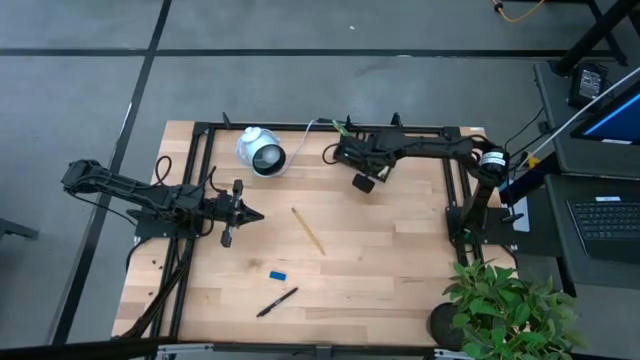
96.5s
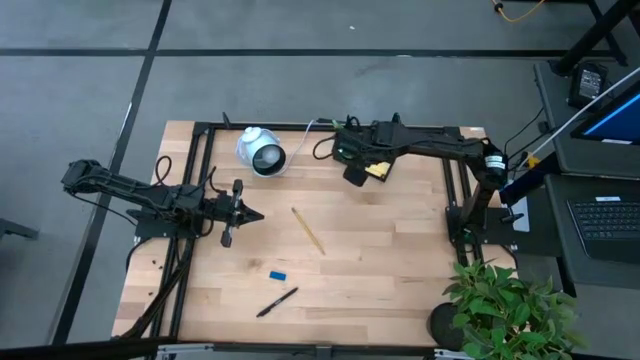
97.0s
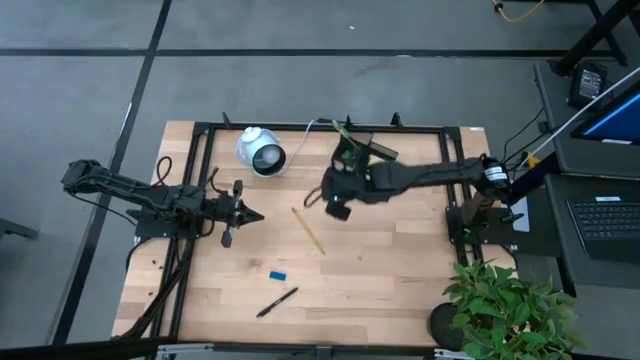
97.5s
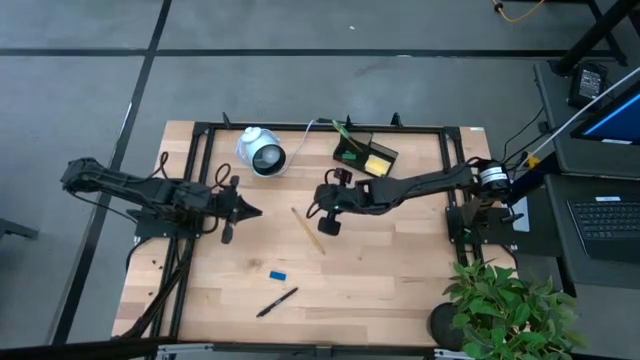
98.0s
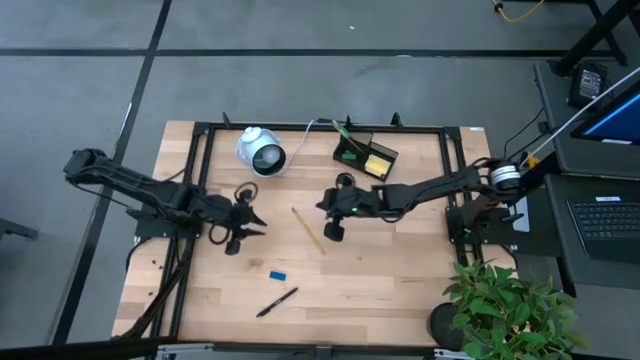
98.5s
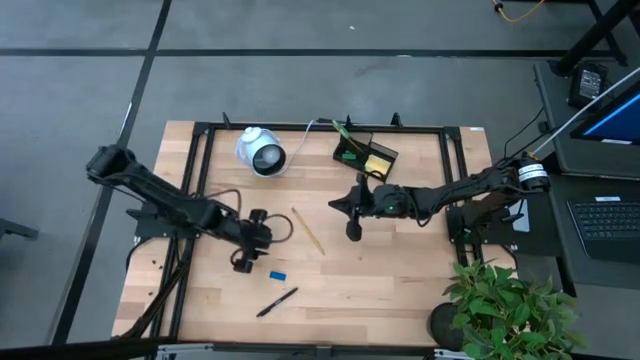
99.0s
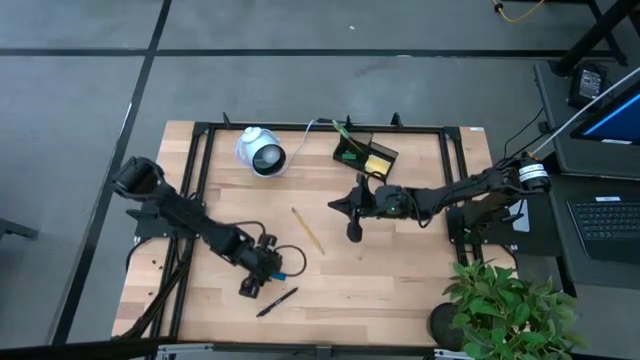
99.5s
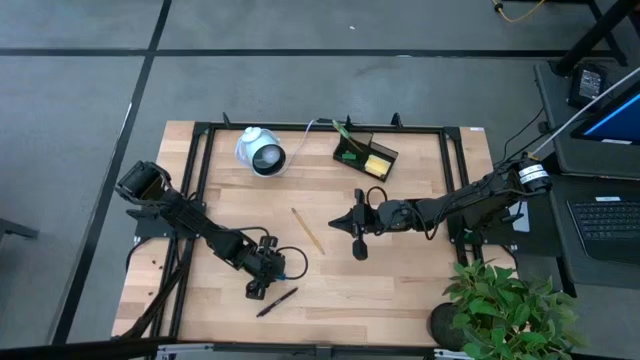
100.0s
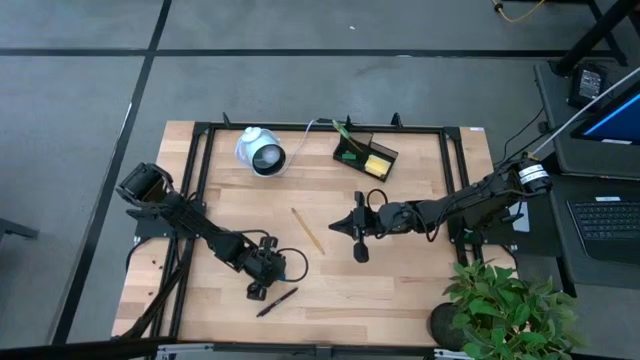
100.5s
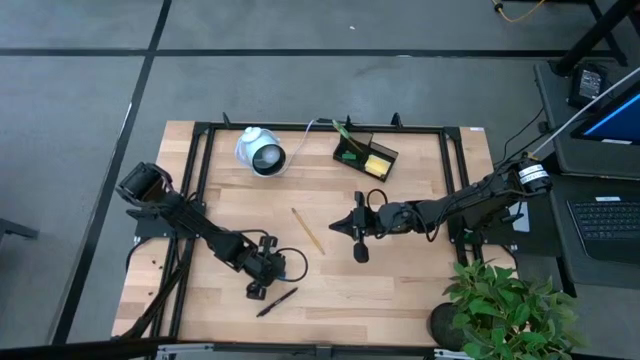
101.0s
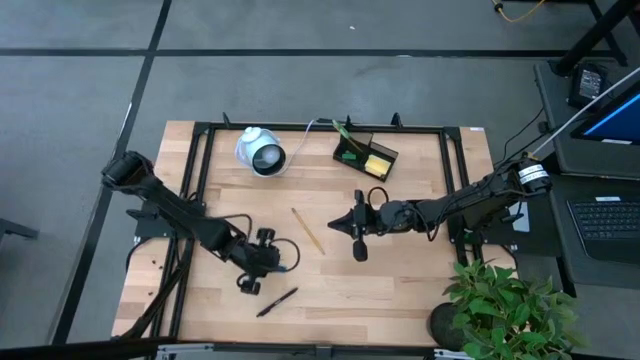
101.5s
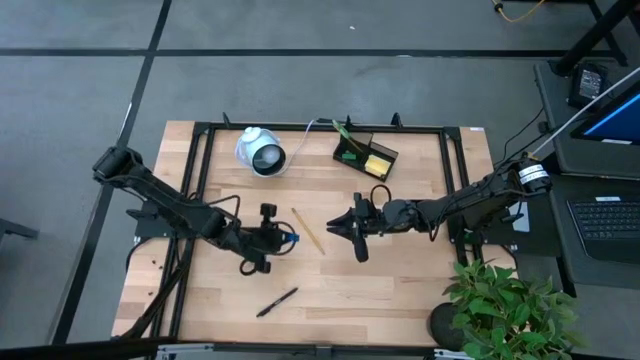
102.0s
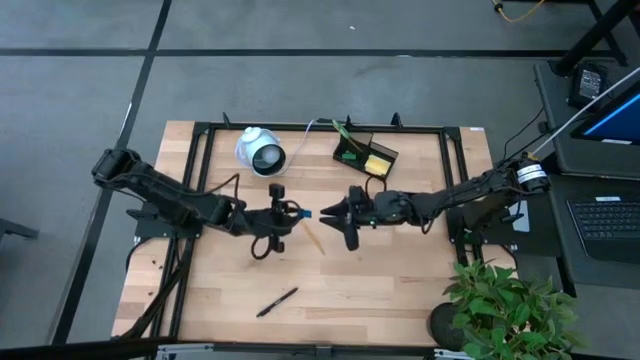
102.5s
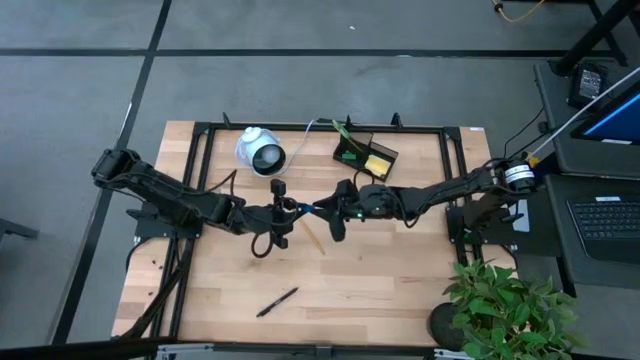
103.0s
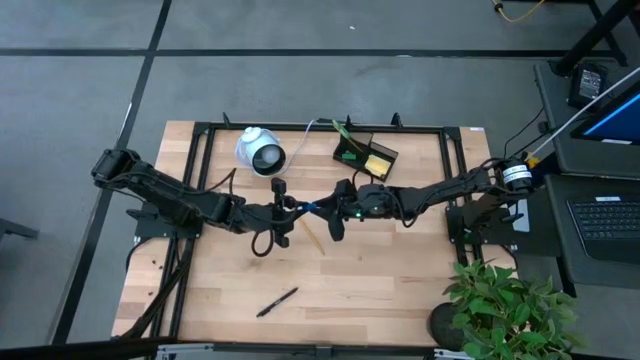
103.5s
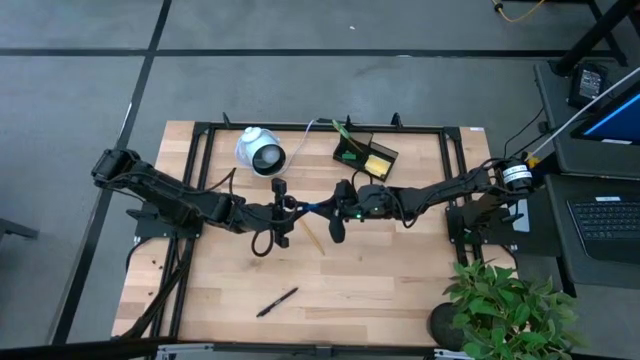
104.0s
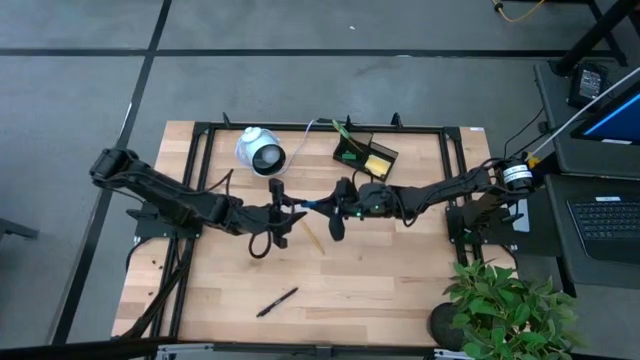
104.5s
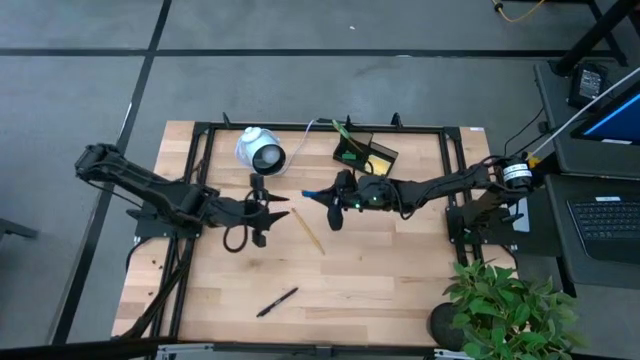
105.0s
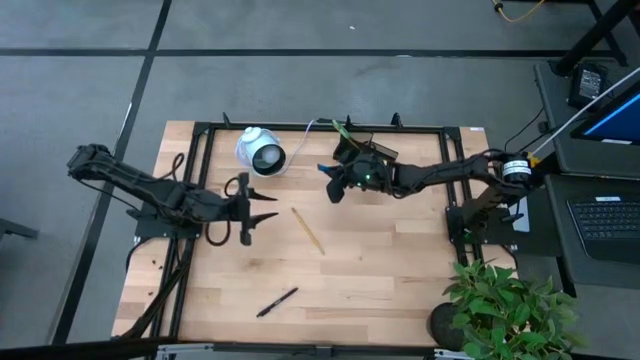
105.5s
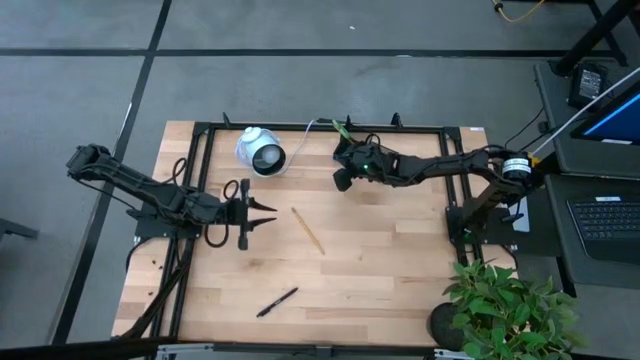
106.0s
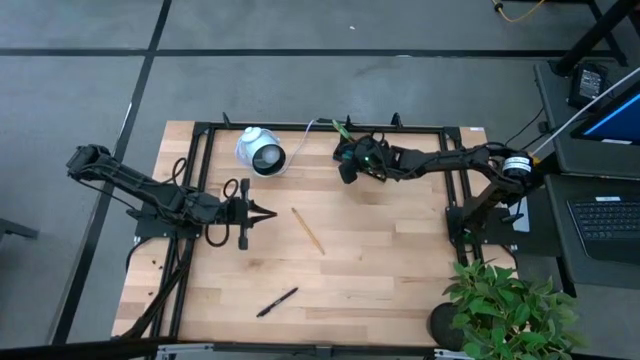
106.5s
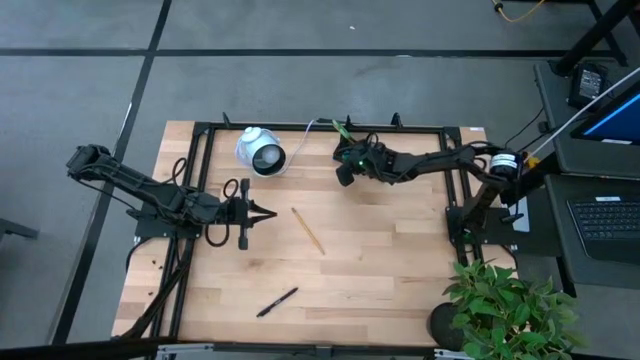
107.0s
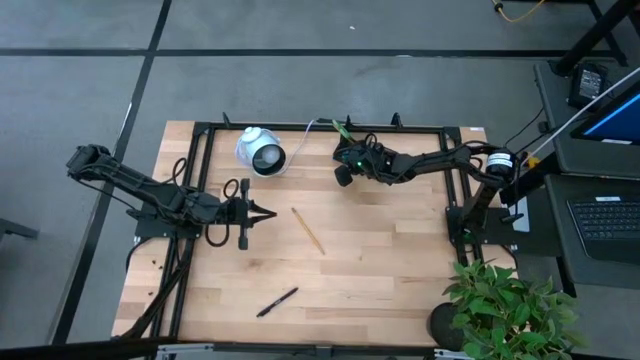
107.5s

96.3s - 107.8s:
Task: Pick and place office supplies into organizer
Put the blue eraser into the desk organizer

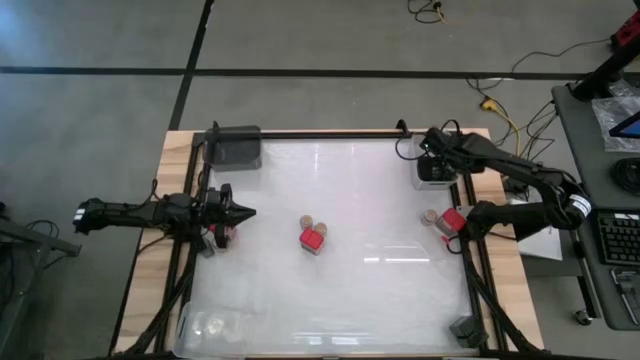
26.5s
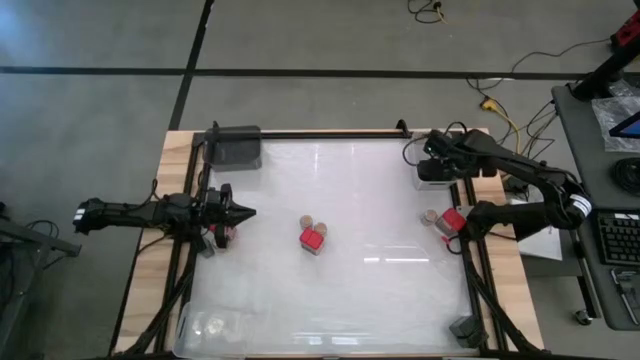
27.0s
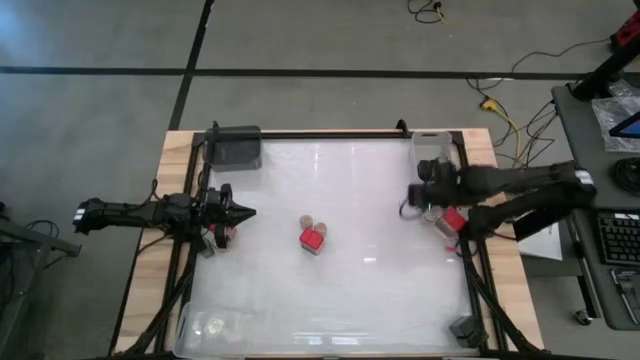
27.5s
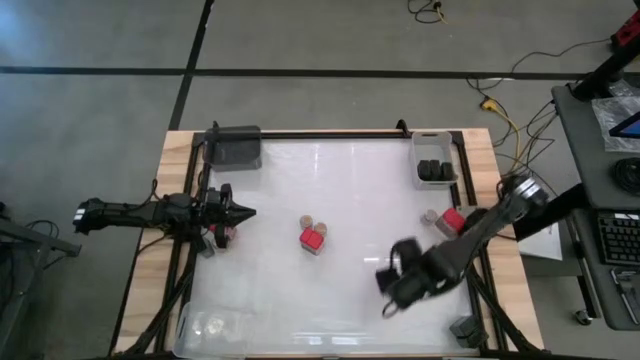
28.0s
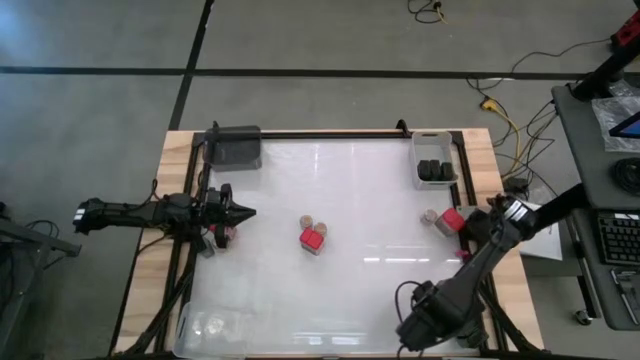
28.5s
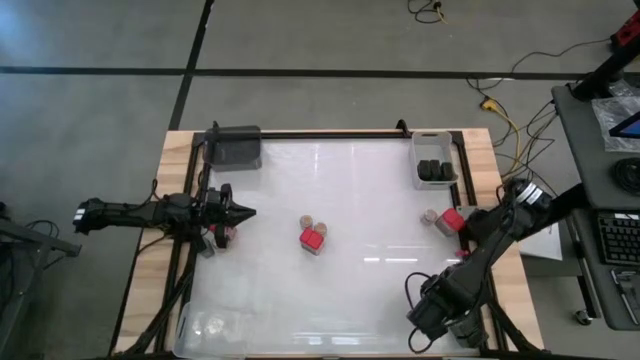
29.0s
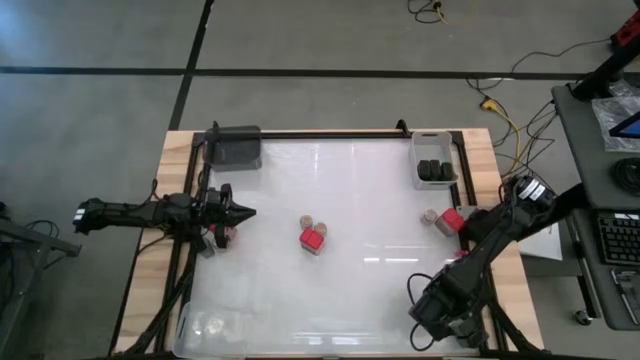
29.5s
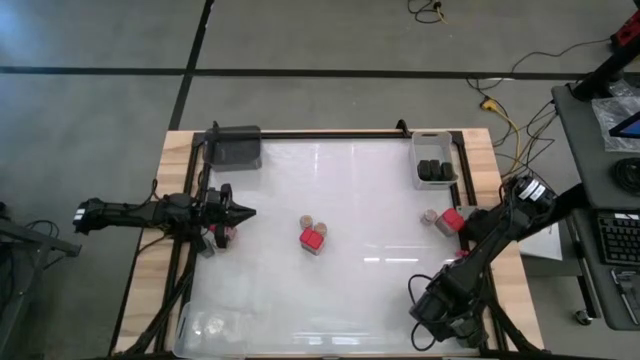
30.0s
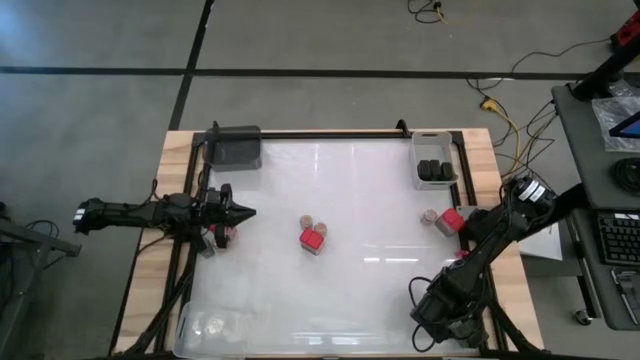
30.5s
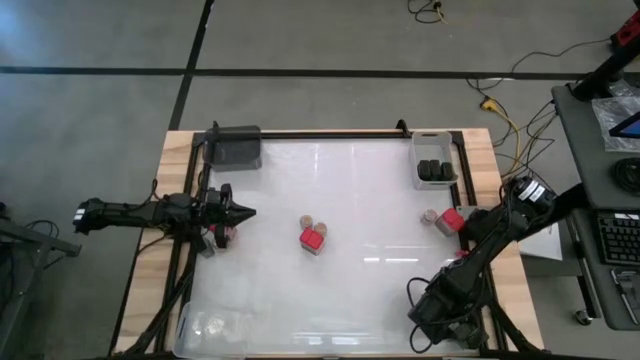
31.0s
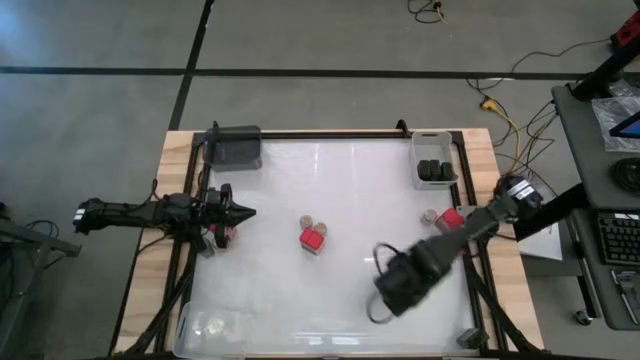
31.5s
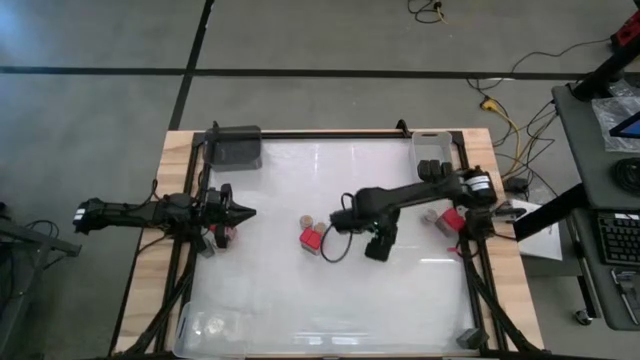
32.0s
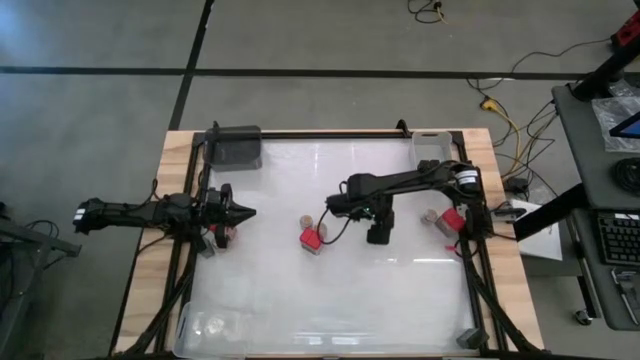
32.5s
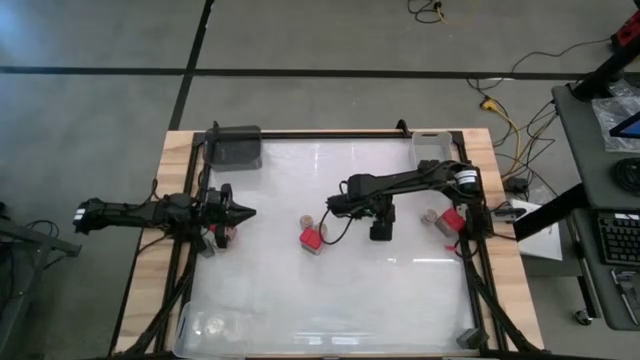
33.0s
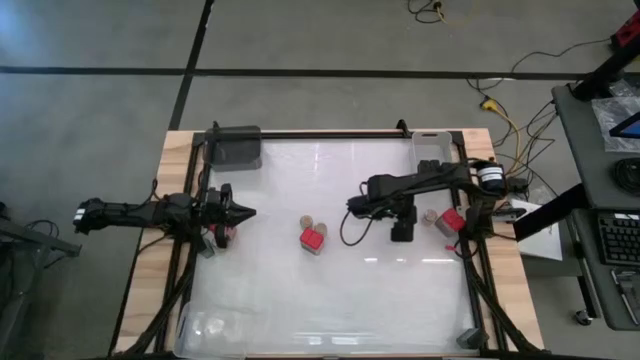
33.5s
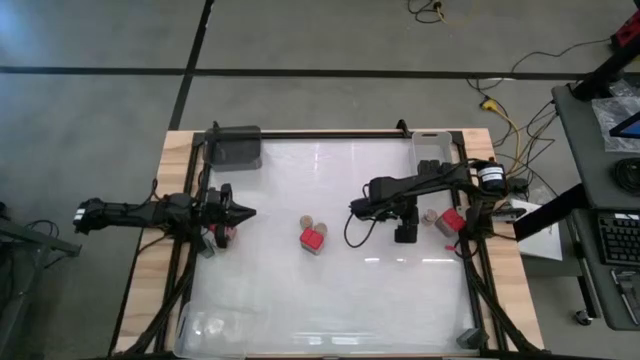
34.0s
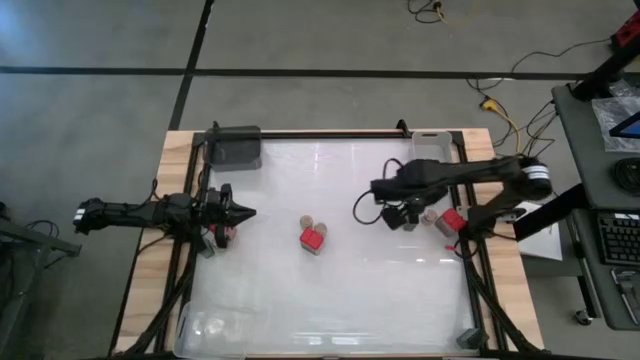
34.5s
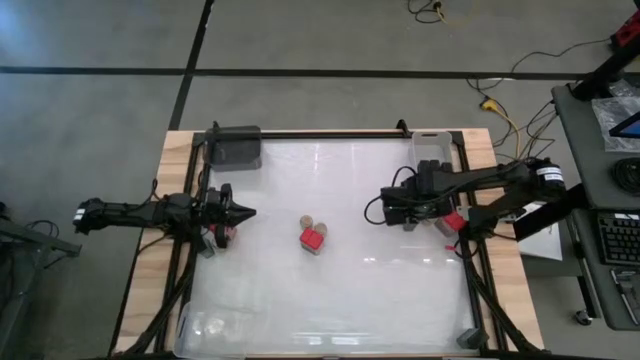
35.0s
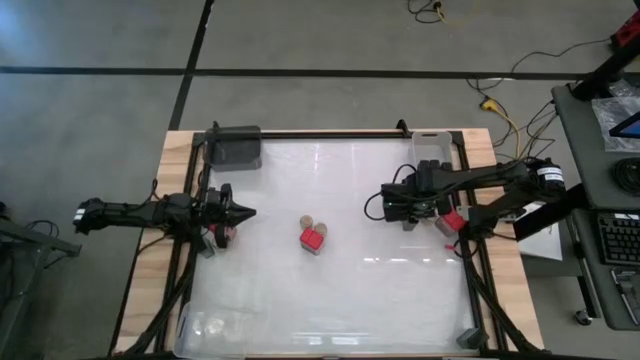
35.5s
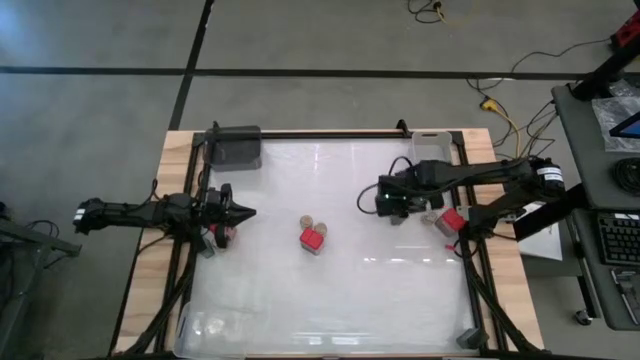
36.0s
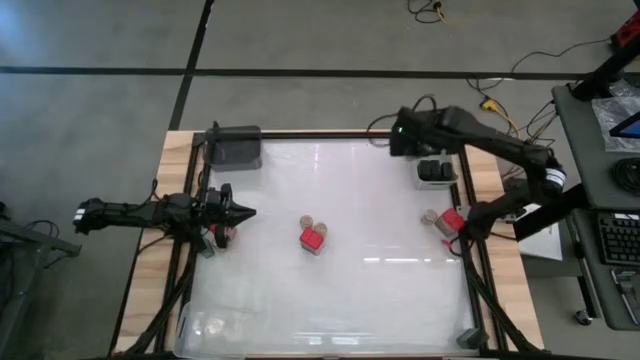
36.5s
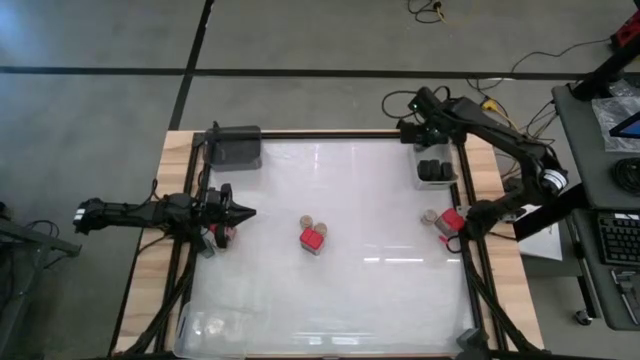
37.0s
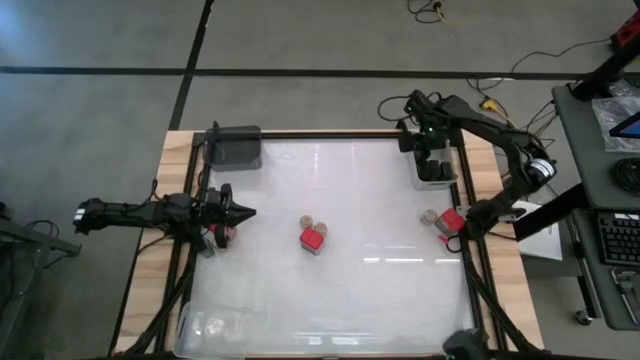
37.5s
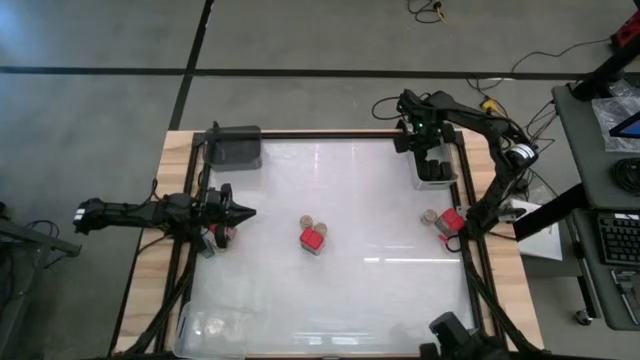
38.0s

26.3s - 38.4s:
Task: Sort spices by type
Put the black seasoning can into the gray bin
